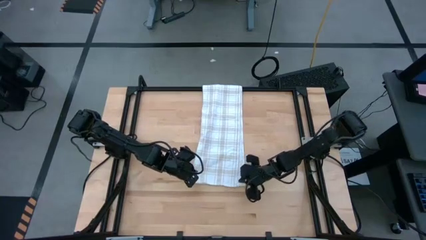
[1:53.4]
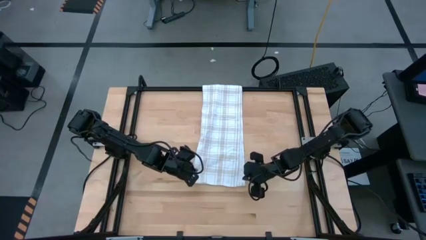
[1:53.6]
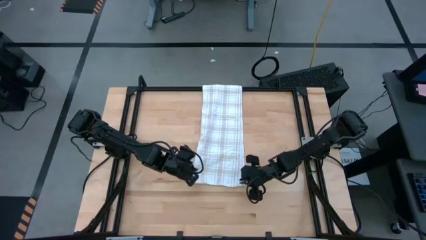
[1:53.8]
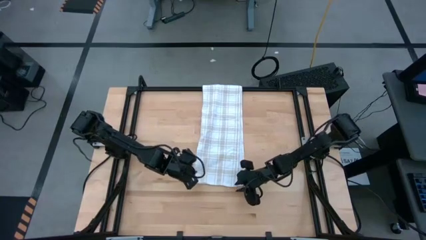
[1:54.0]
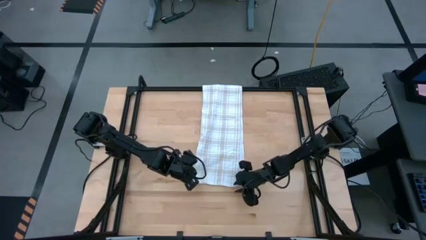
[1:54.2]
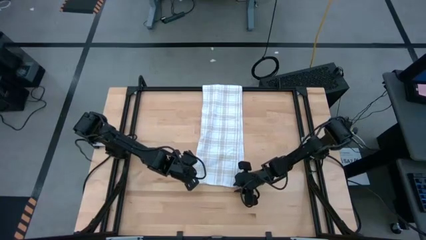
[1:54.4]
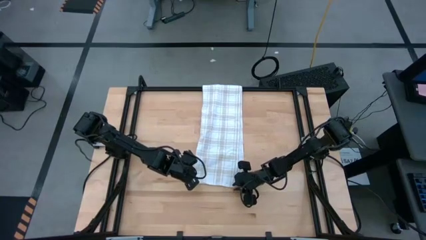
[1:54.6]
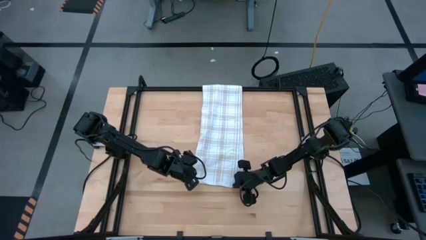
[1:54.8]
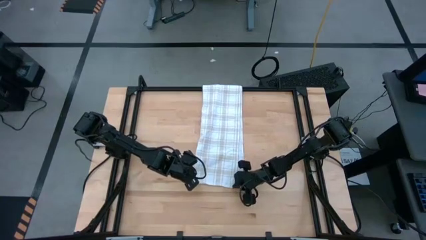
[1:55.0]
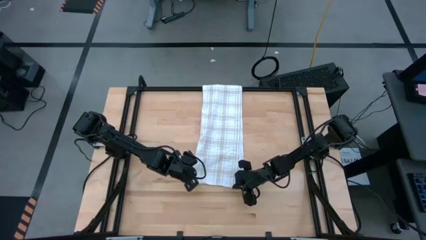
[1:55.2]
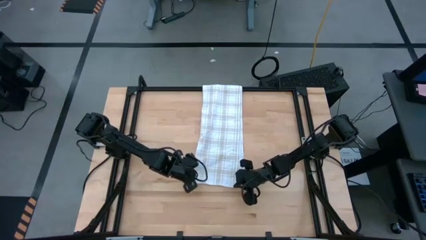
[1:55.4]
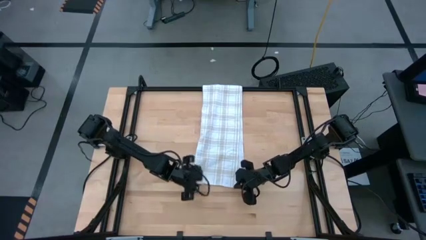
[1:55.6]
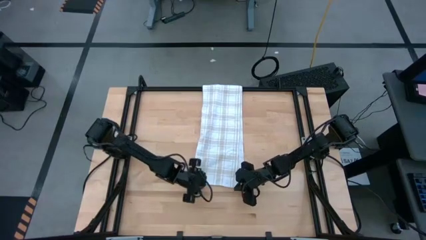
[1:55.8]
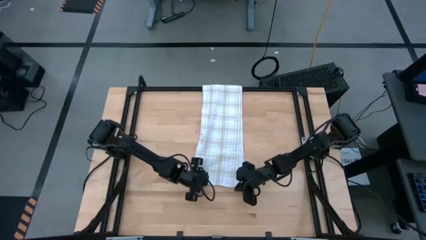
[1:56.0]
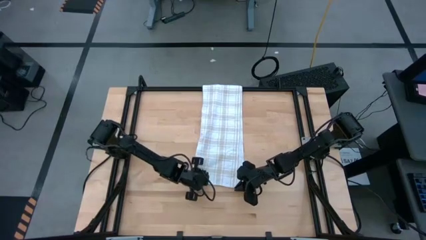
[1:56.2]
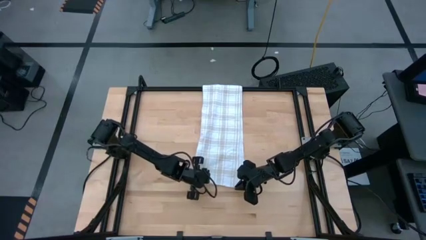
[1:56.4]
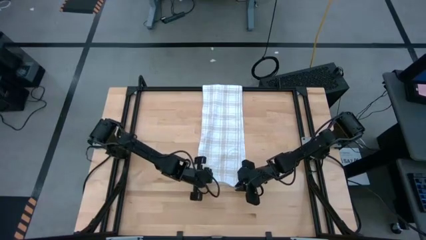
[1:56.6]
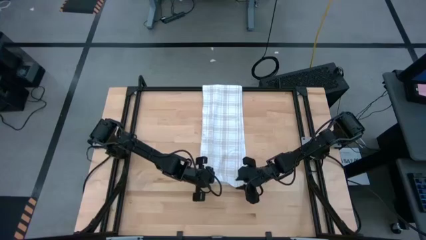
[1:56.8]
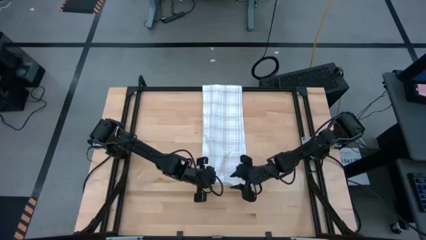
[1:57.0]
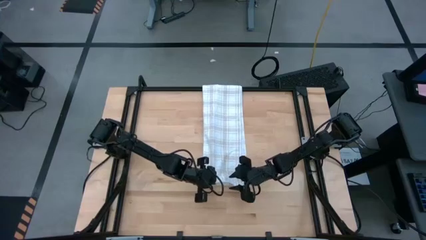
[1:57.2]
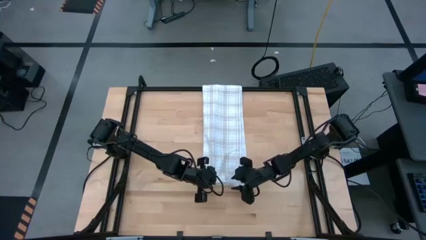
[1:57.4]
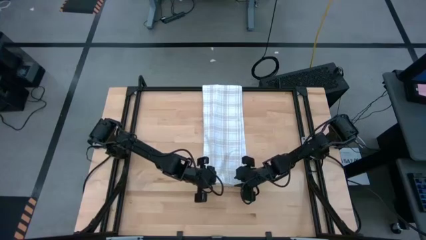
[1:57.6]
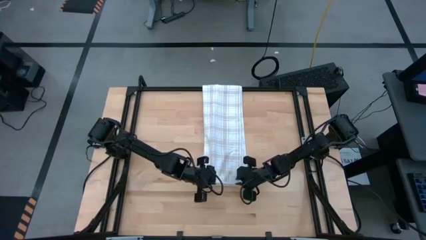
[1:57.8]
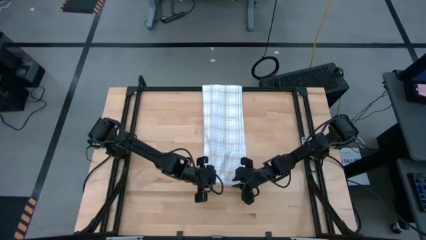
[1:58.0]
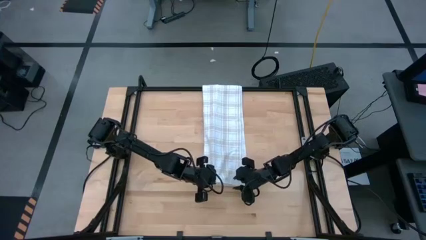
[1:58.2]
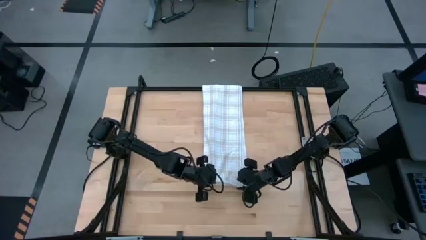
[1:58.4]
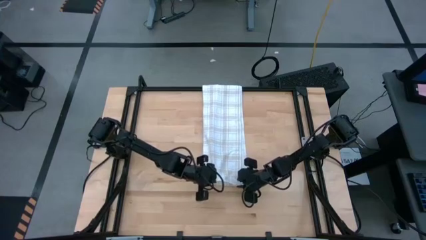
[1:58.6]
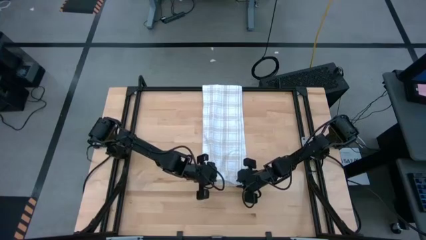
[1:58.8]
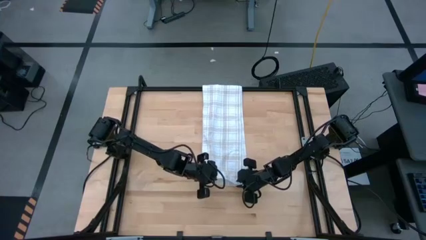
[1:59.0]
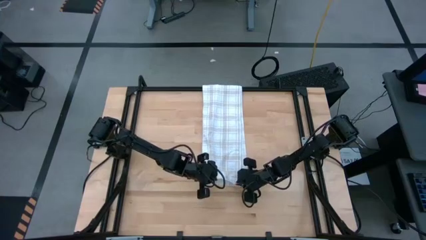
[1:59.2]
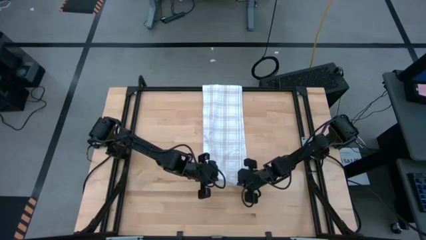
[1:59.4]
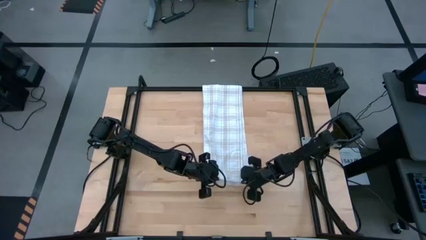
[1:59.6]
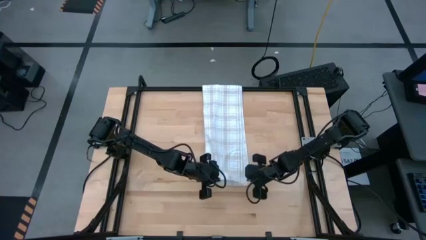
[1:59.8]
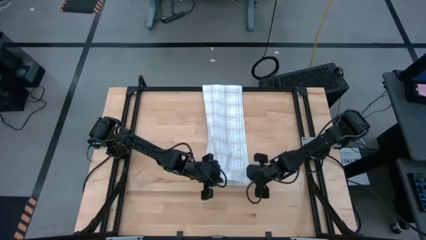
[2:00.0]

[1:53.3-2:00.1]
Task: Roll towel into tight, uniform cylinder
Roll the white towel

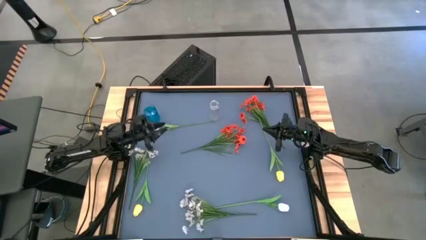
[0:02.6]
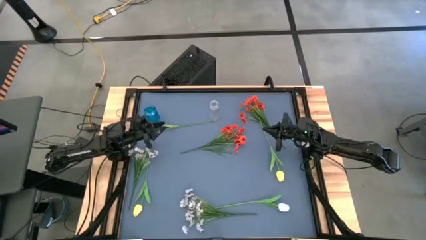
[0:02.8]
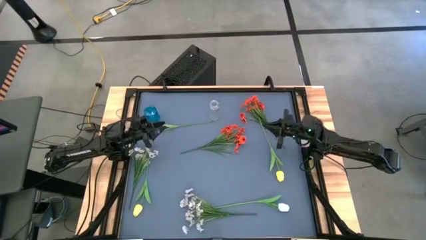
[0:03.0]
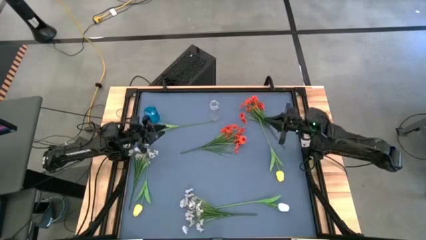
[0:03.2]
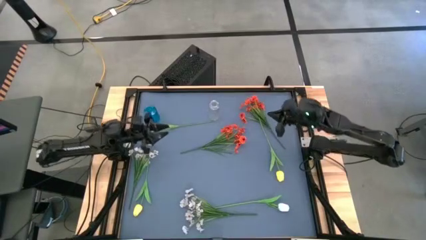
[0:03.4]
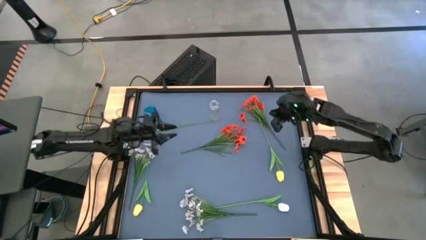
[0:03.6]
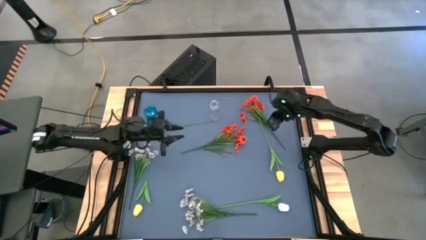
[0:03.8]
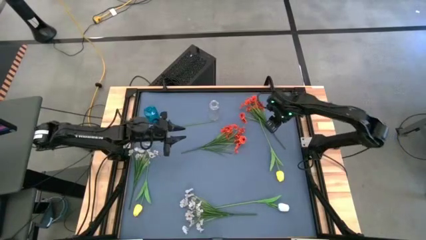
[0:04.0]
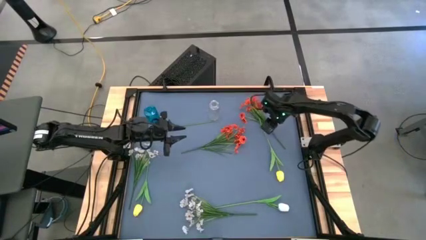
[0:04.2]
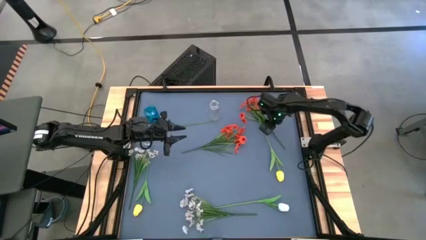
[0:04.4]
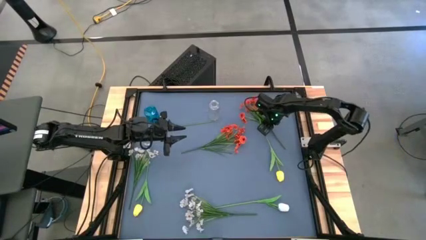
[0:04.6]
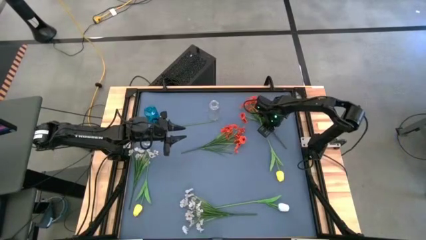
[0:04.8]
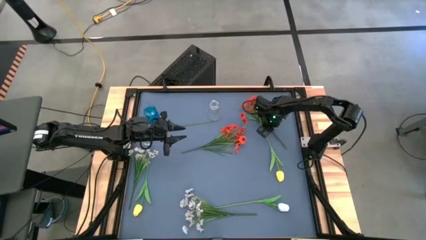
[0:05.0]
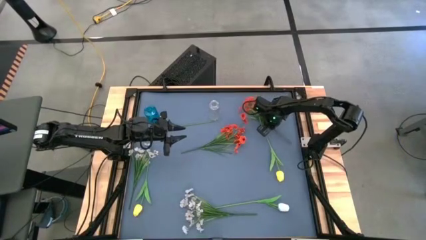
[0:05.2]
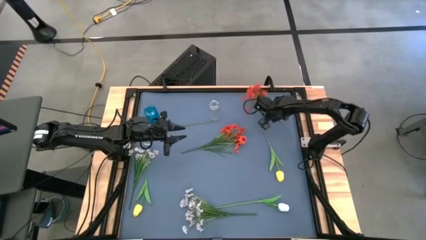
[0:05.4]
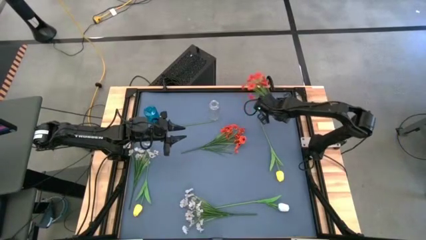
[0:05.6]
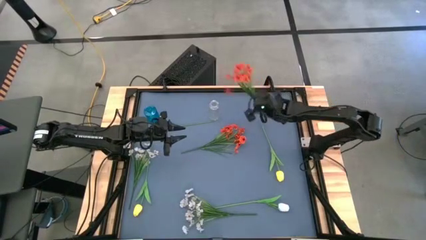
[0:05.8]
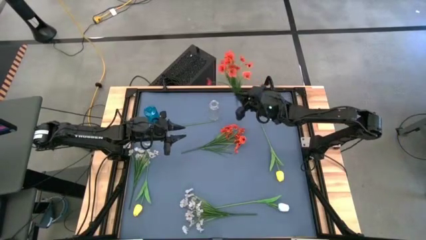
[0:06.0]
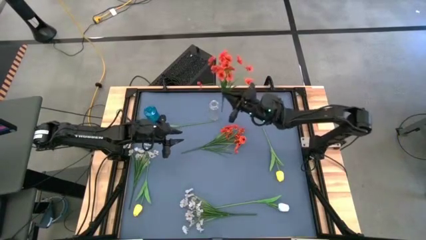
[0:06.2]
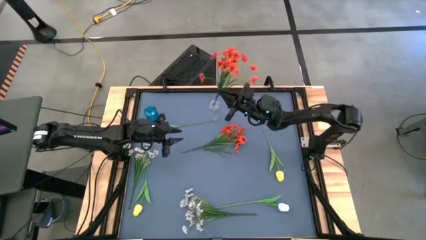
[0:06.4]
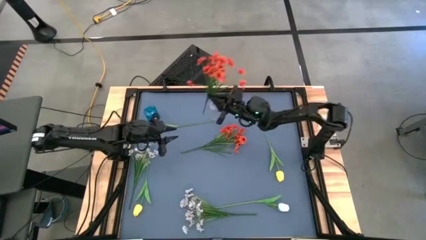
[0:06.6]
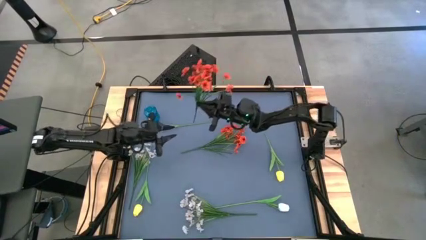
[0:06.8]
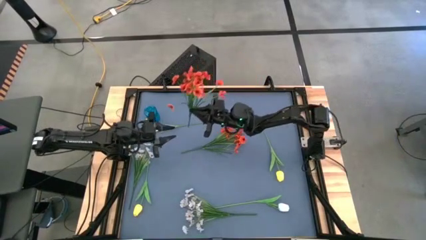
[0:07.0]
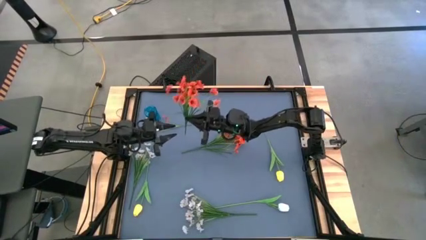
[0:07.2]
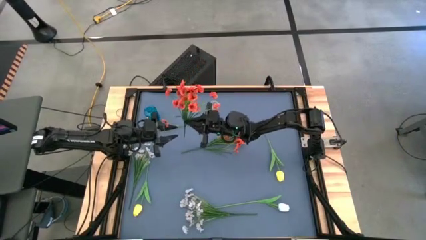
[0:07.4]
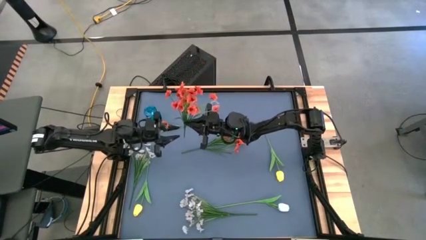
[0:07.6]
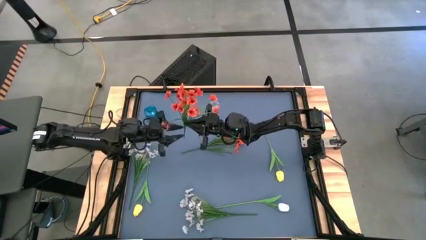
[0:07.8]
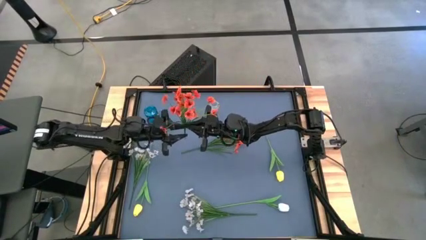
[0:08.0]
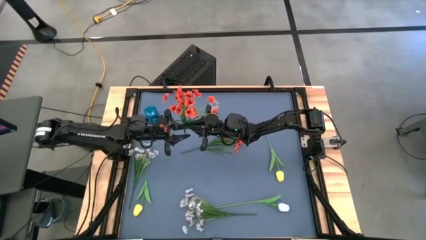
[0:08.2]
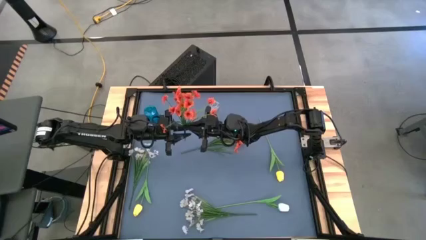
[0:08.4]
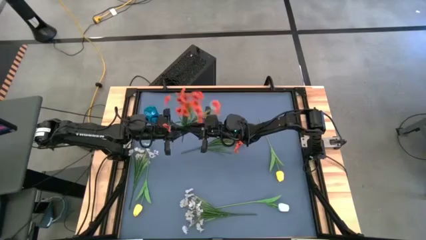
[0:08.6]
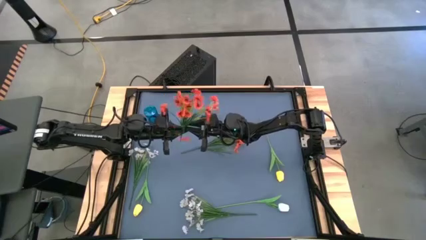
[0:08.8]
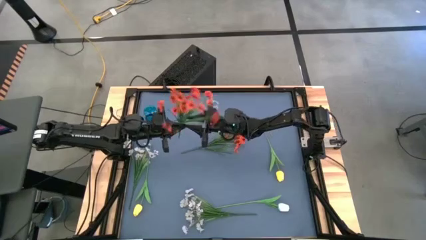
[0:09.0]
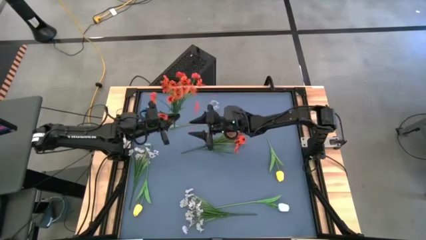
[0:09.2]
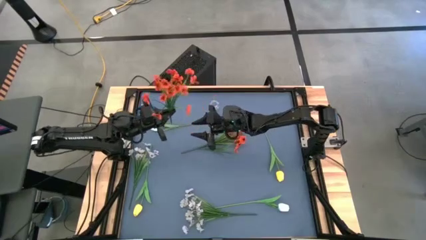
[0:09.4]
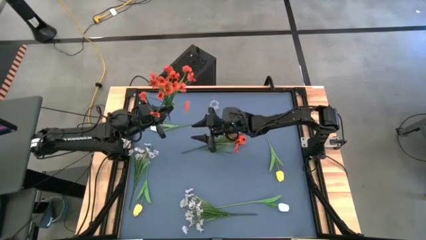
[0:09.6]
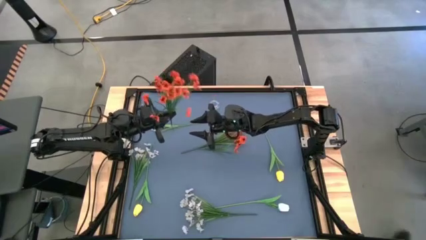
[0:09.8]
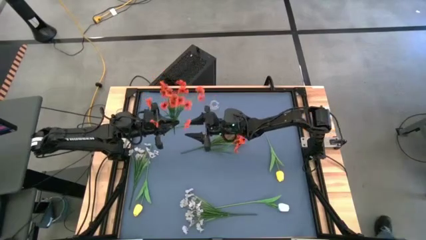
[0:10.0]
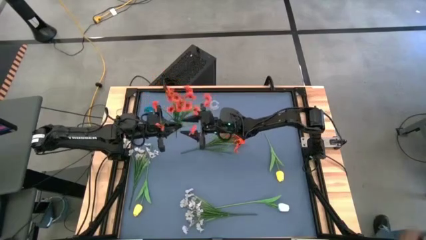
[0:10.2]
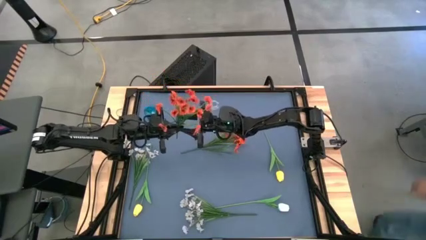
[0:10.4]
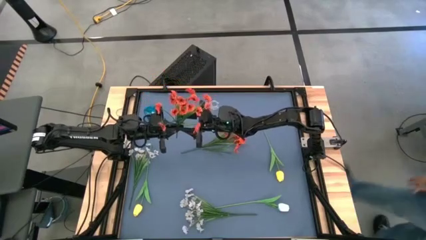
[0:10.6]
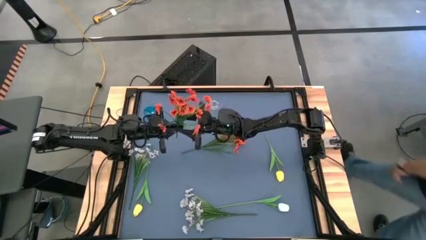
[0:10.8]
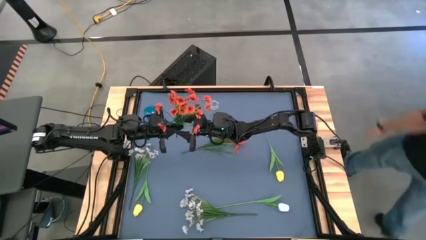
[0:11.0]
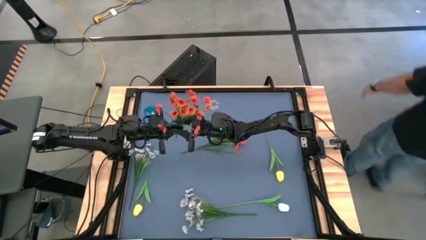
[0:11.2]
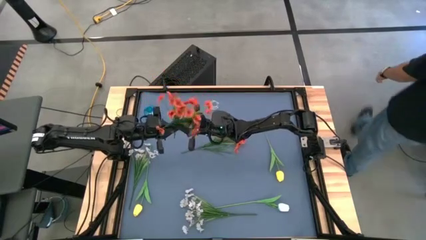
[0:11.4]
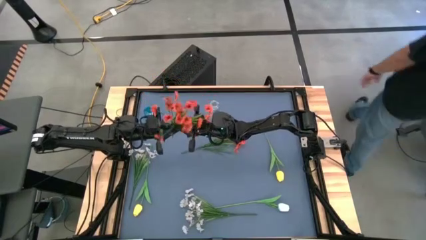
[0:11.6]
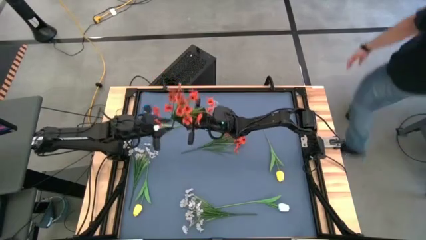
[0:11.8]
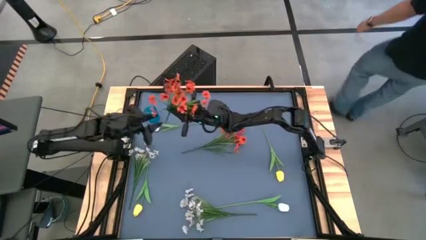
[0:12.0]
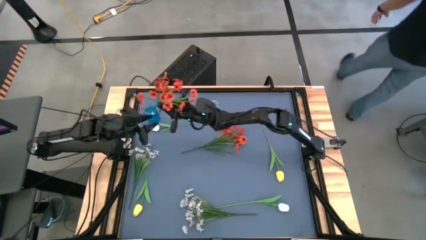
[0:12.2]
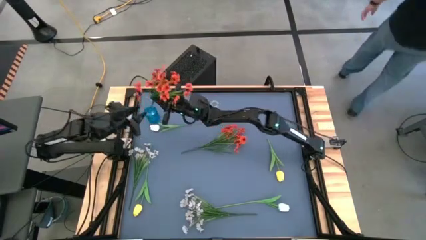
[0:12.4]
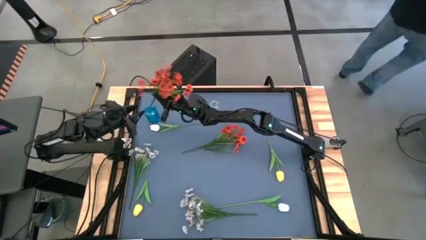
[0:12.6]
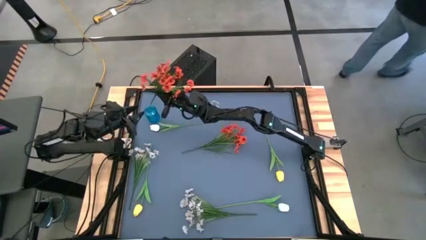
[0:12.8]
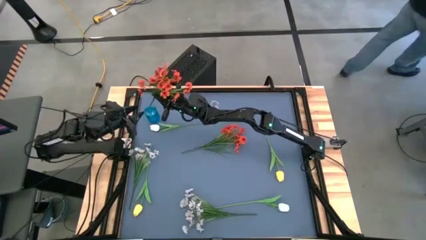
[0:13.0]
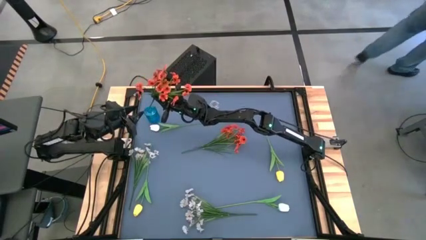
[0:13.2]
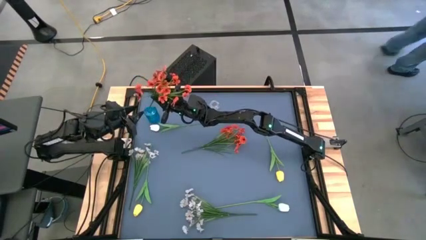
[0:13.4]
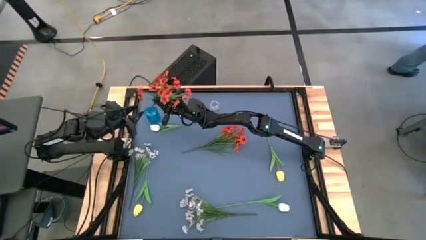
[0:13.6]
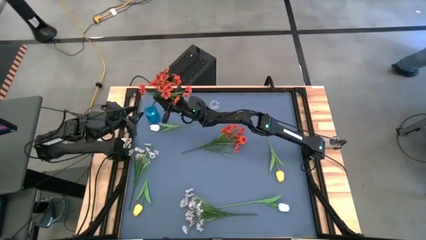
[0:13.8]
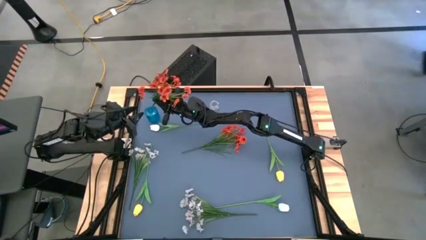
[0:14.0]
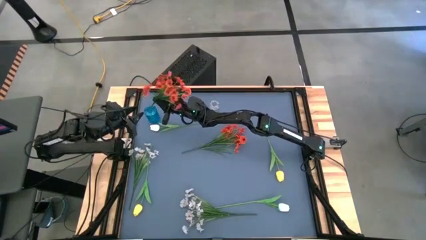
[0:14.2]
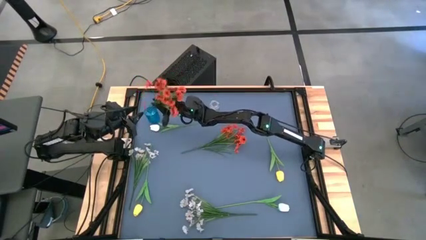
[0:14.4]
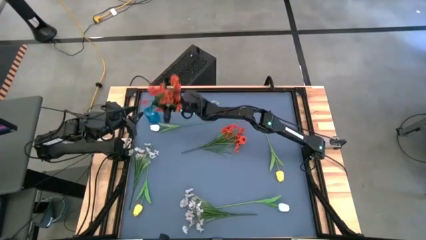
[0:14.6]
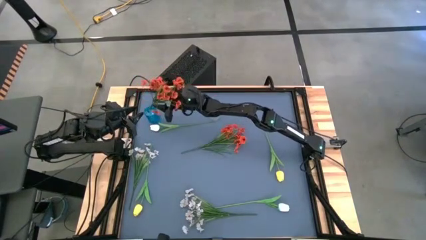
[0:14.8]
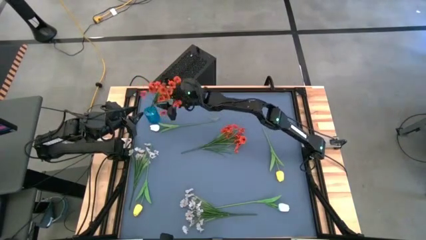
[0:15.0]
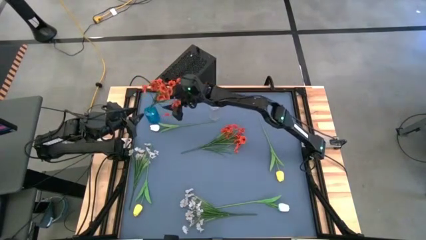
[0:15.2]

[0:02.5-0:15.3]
Task: Sort flowers into vase by color
Put the top orange flowers into the blue vase
